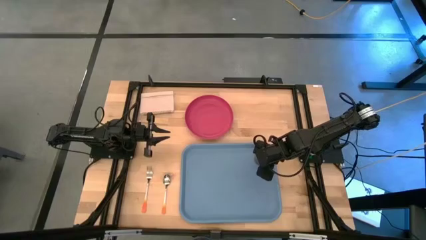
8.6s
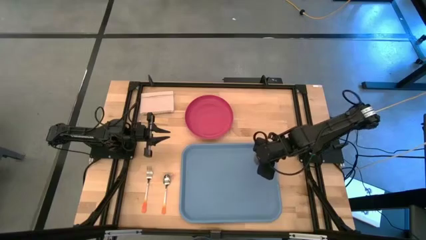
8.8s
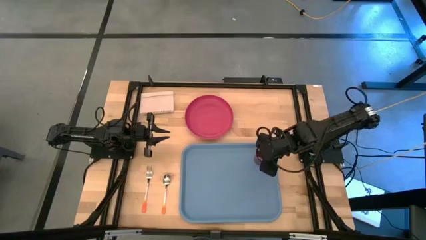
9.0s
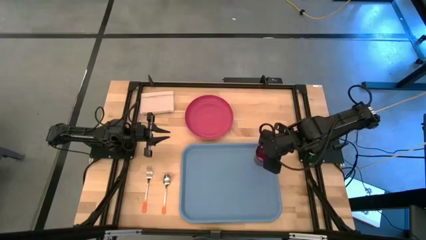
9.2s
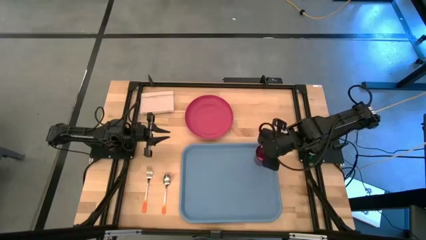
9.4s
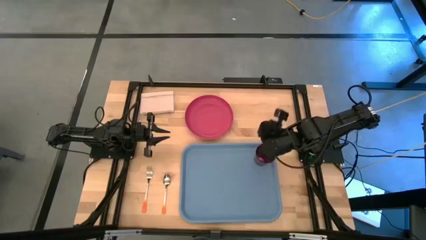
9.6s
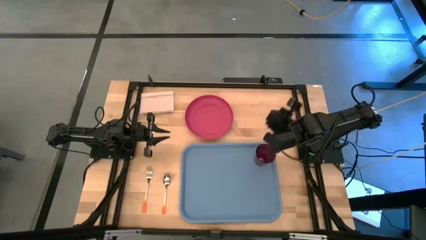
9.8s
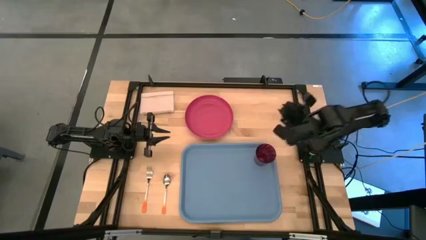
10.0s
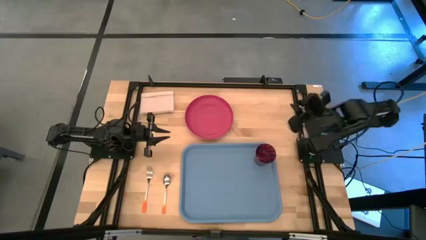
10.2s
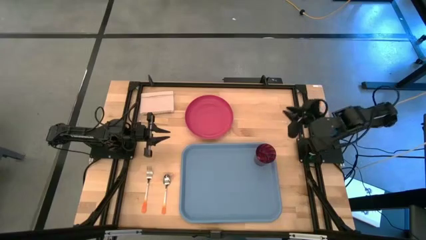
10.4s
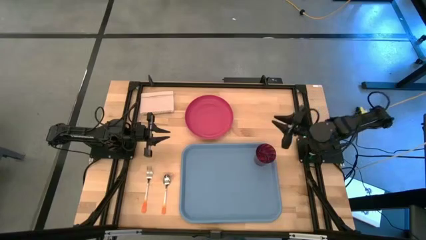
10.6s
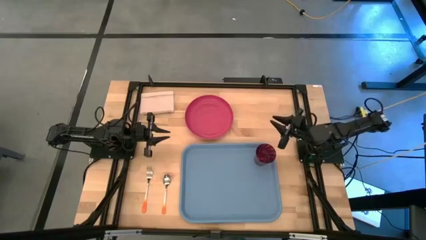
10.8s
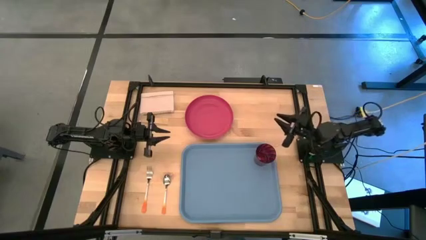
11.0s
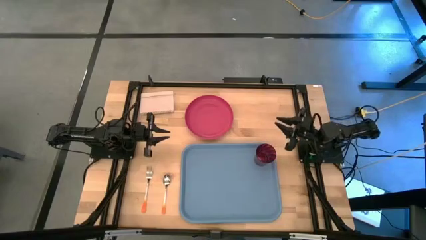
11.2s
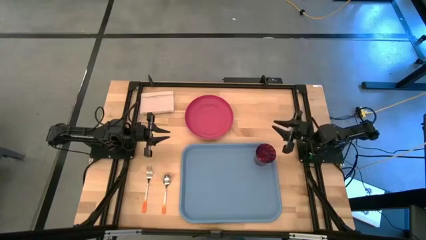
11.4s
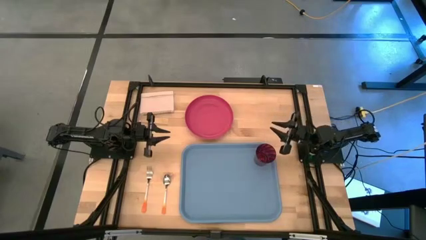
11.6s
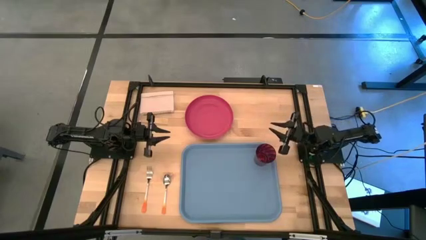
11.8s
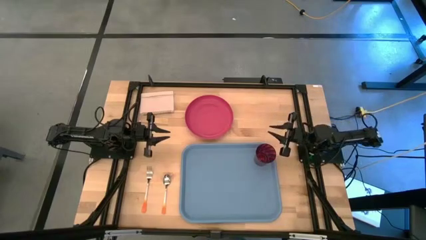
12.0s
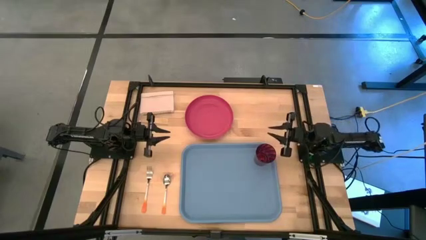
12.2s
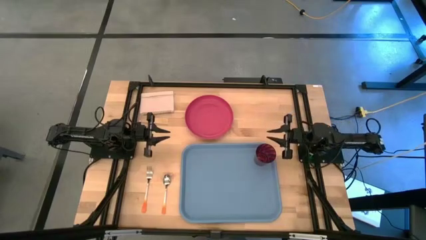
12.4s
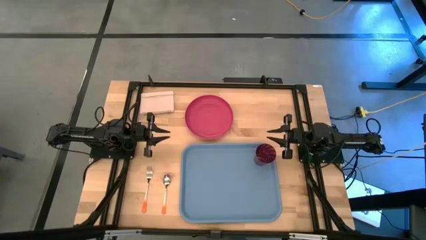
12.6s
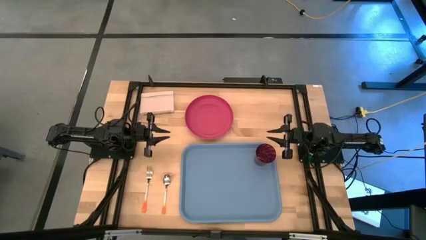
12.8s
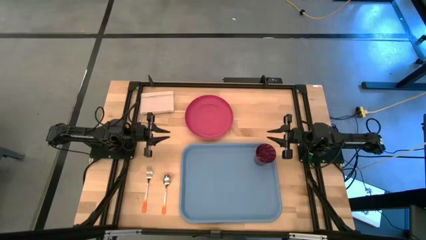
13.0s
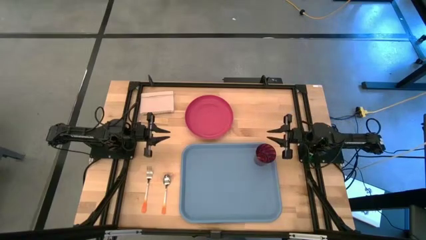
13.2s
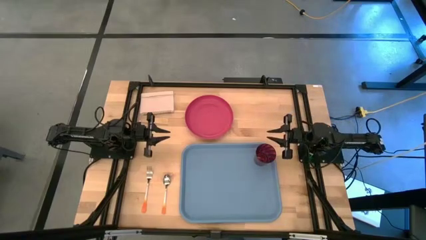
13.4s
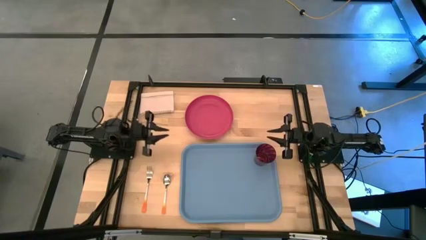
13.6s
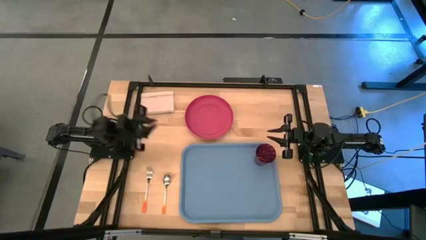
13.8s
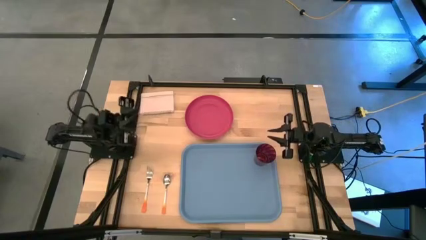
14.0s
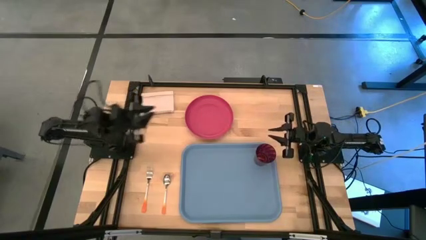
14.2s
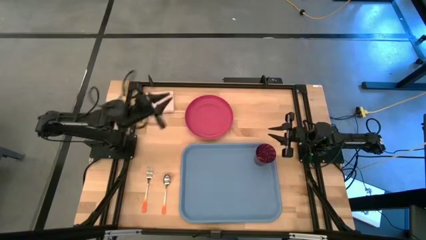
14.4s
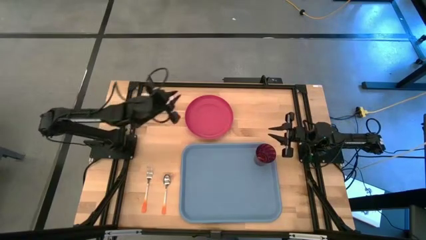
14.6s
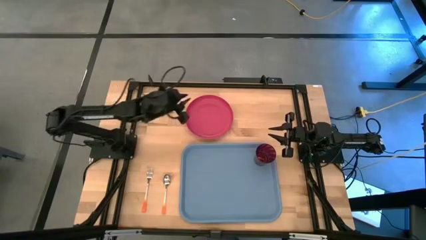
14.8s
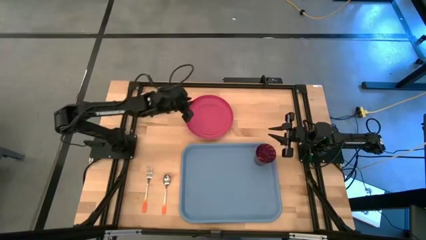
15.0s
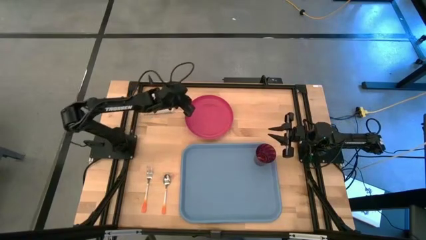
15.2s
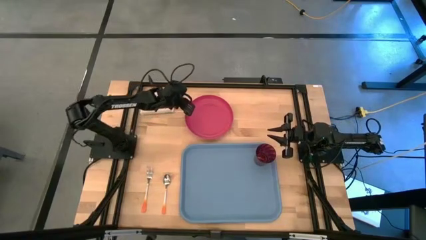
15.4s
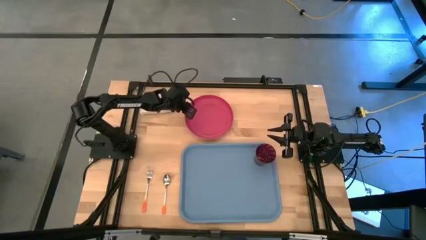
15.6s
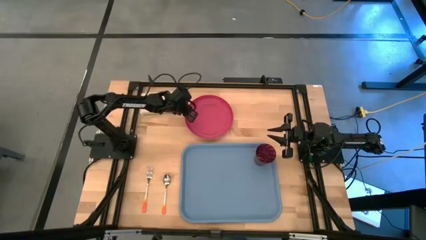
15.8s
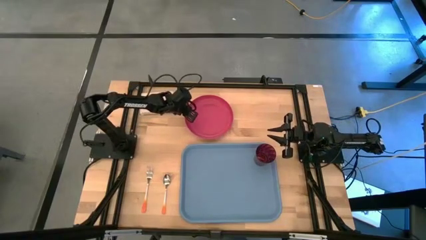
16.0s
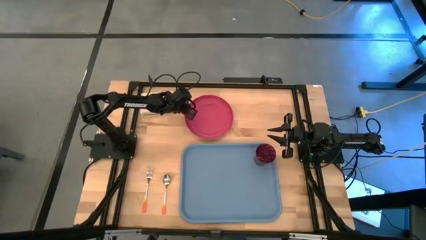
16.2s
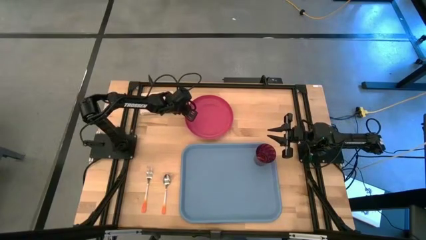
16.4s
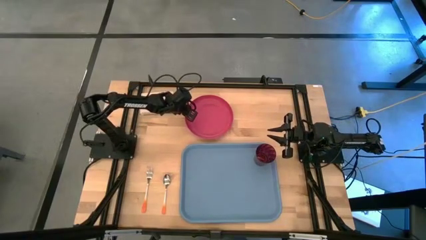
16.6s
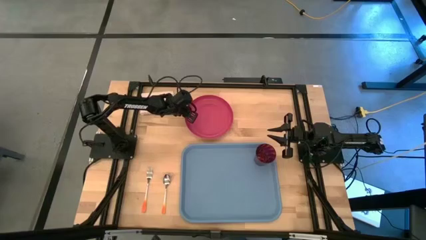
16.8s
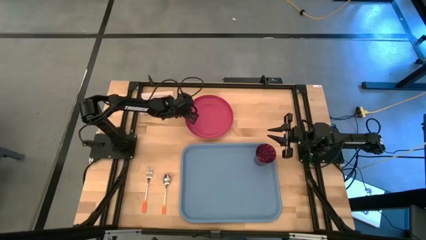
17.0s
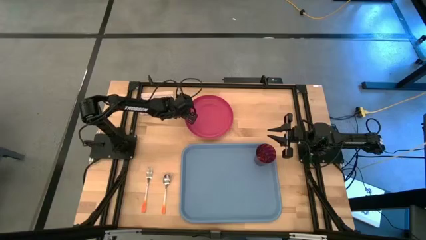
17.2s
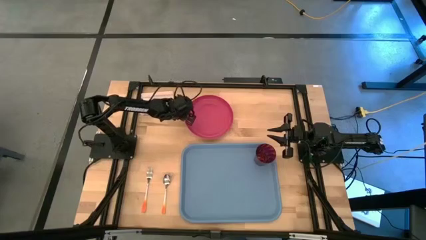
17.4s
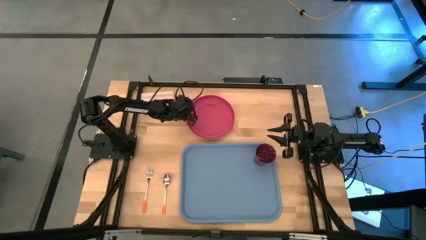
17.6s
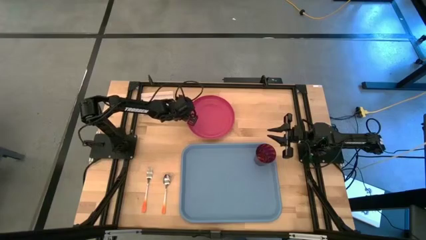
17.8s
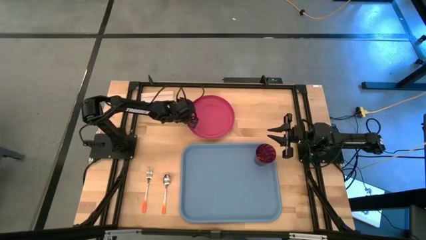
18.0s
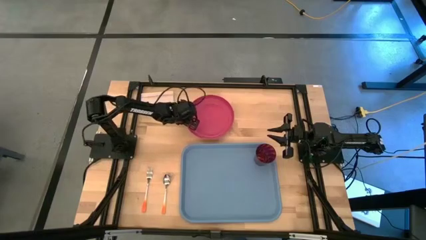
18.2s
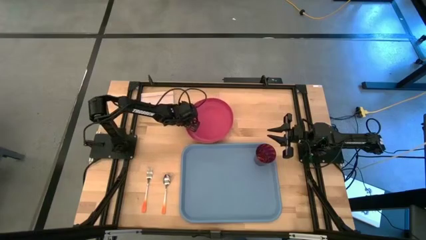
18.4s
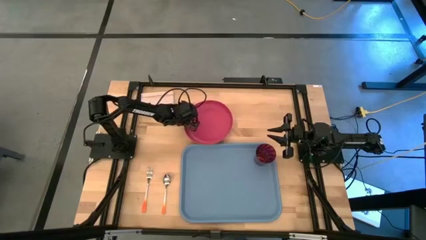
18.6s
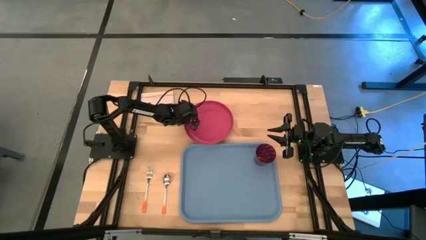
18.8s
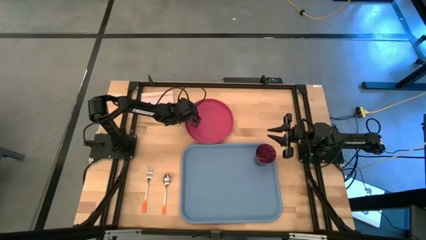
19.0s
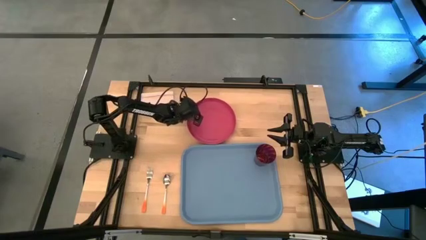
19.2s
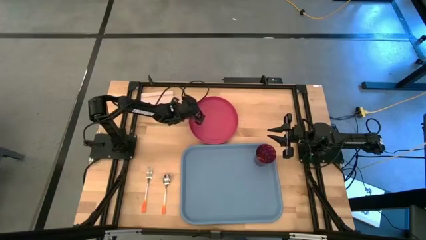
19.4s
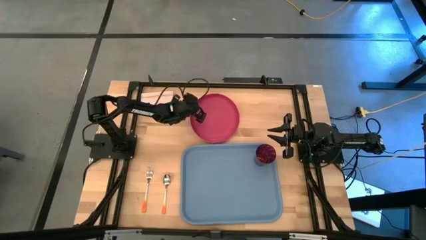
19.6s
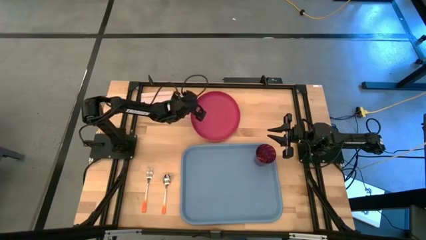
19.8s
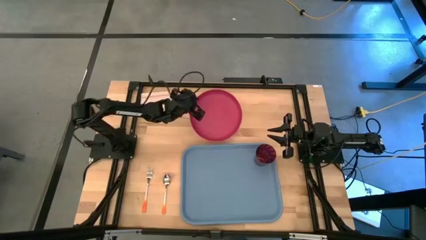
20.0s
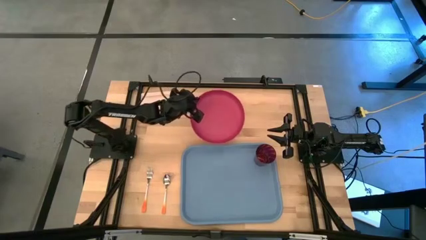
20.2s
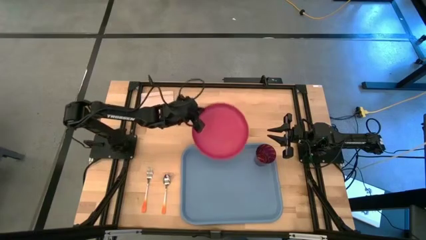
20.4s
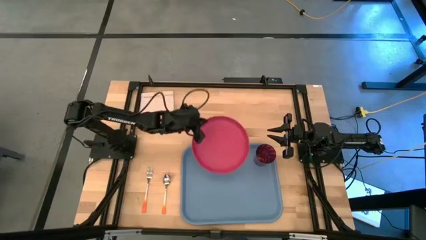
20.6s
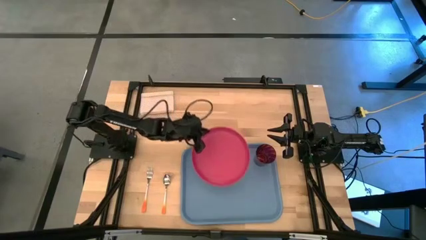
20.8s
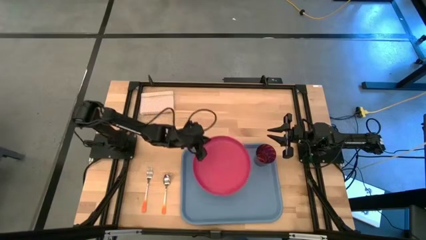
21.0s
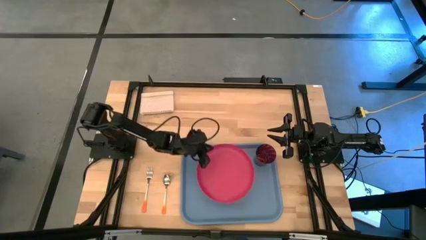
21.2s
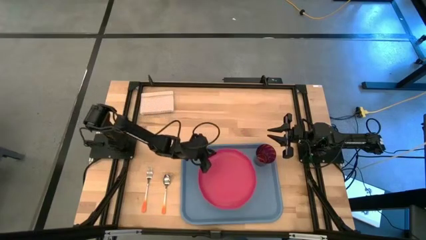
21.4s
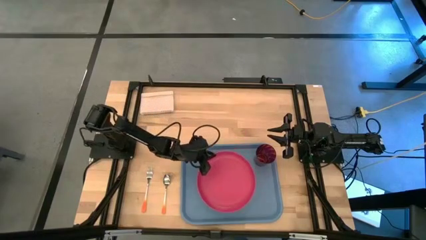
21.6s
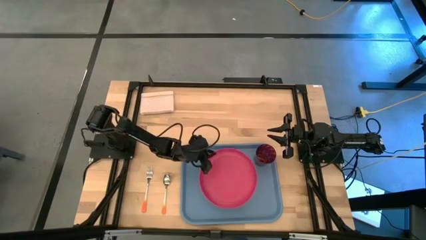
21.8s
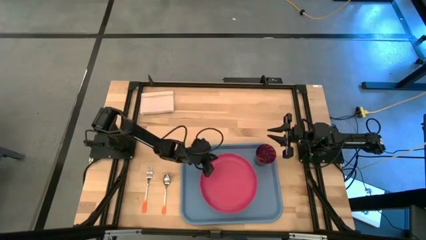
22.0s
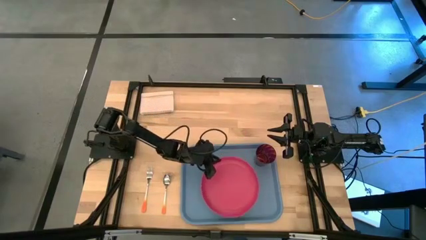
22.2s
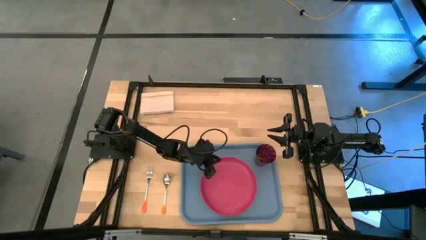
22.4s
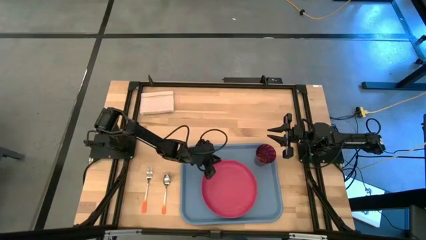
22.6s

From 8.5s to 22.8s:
Task: Pick and place plate/cup/fork/spoon on tray
Put the pink plate in the middle of the blue tray

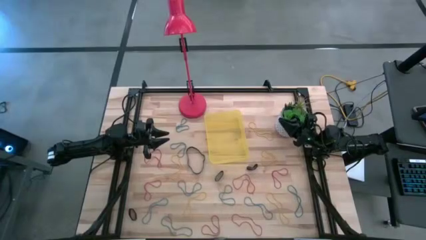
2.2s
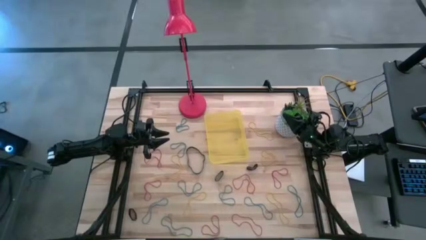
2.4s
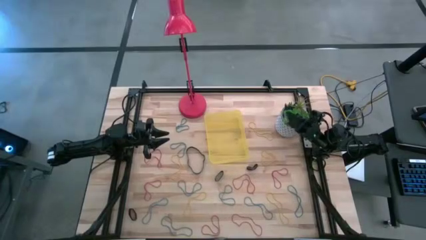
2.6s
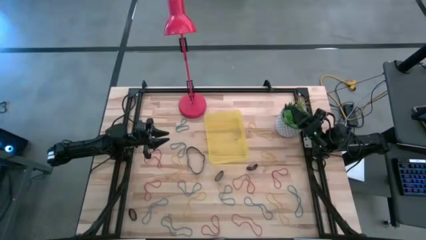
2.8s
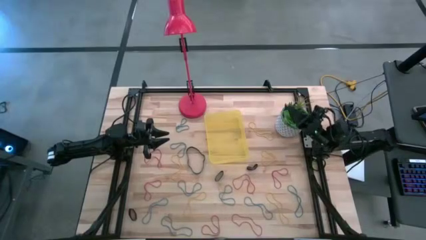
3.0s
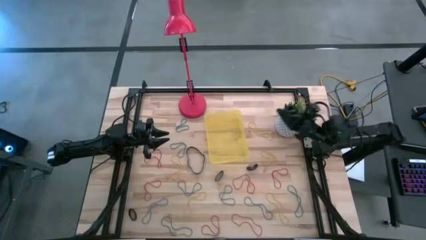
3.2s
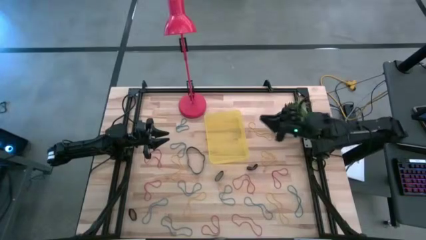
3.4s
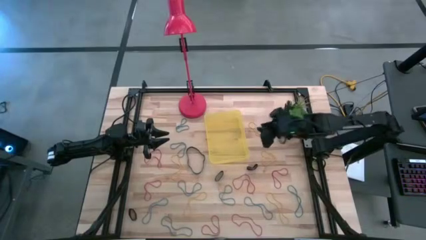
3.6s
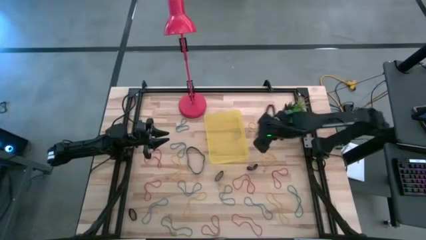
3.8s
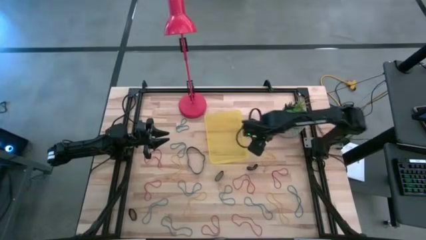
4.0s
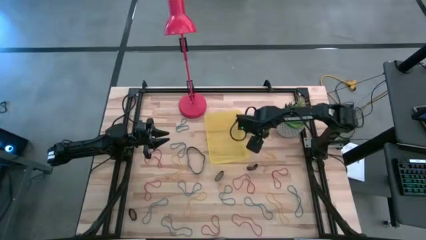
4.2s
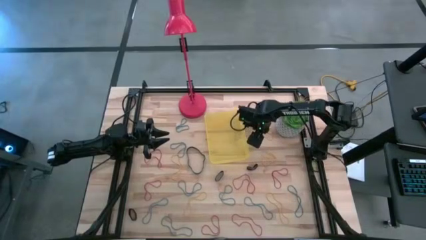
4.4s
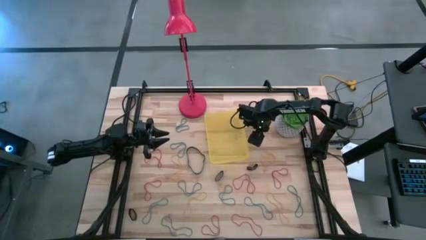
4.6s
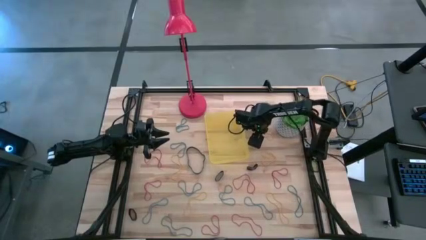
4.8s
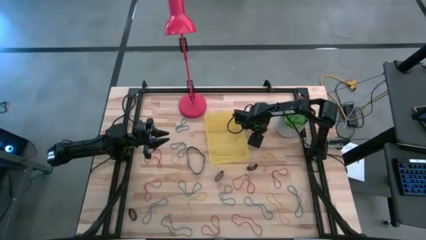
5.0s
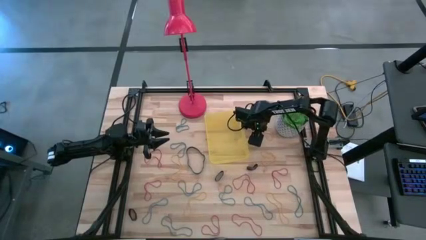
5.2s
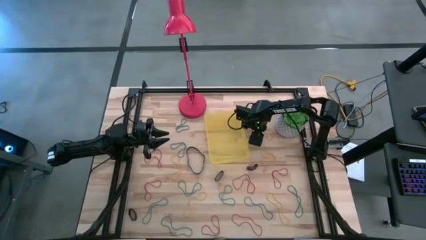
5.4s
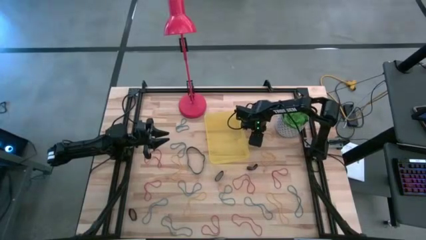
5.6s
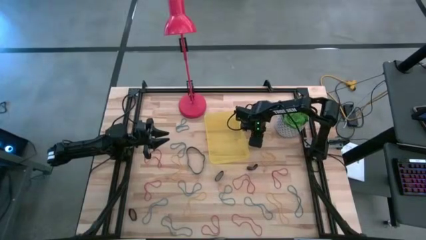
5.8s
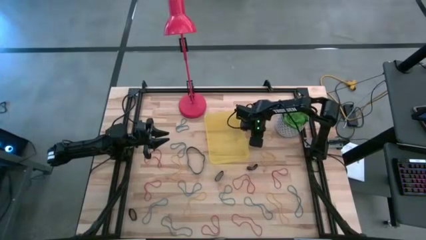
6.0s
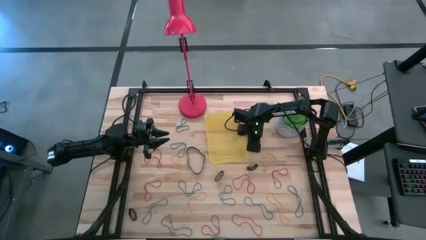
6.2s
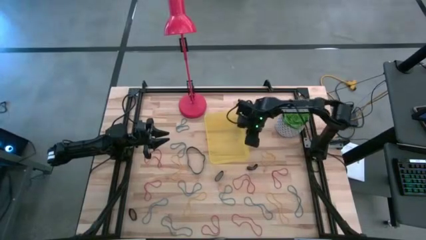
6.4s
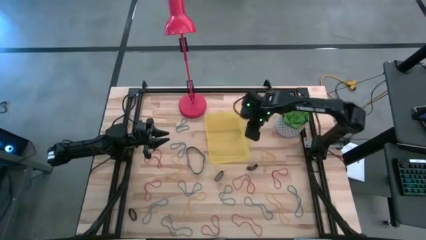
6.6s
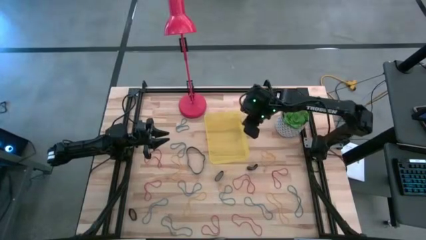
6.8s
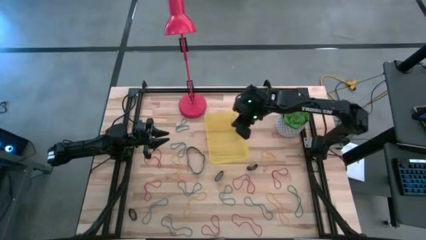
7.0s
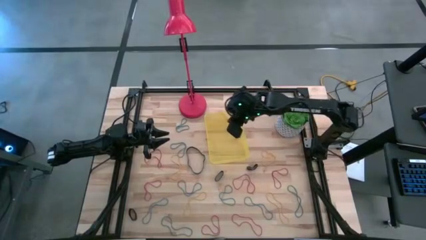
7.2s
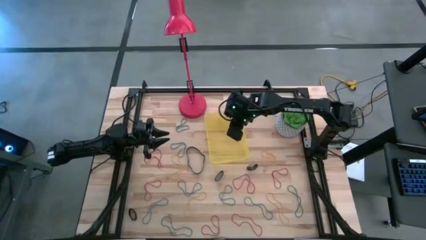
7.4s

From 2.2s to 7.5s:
Task: Pick and place rubber bands into bin
Put the yellow rubber band into the yellow bin
